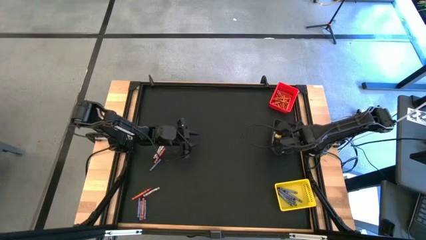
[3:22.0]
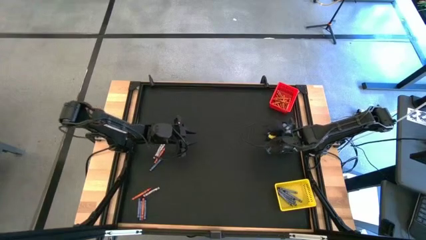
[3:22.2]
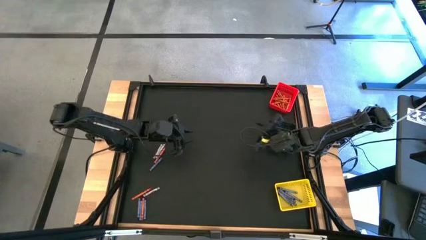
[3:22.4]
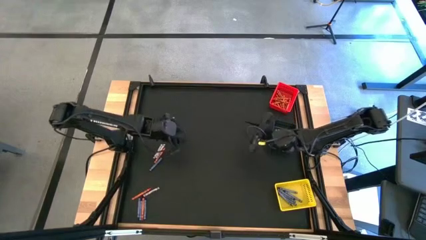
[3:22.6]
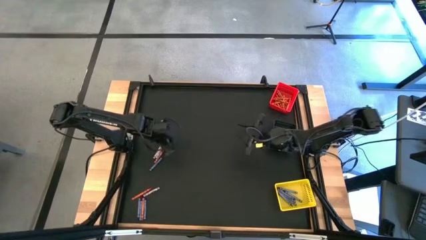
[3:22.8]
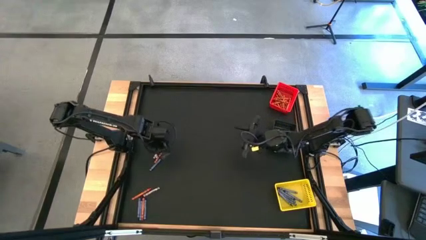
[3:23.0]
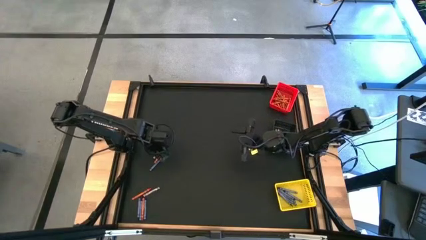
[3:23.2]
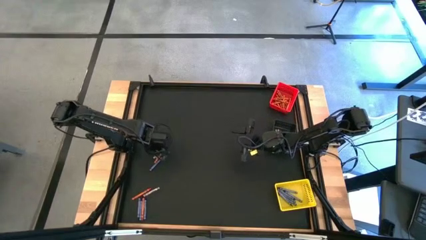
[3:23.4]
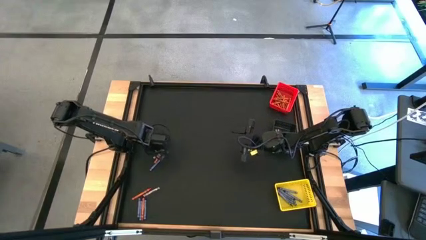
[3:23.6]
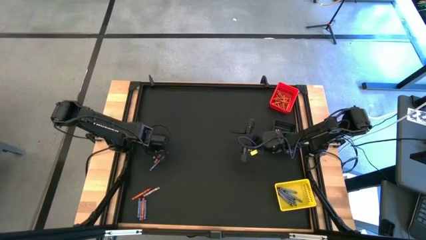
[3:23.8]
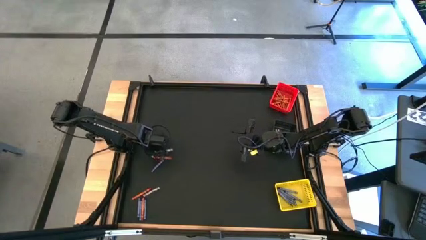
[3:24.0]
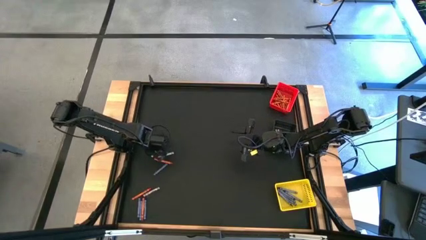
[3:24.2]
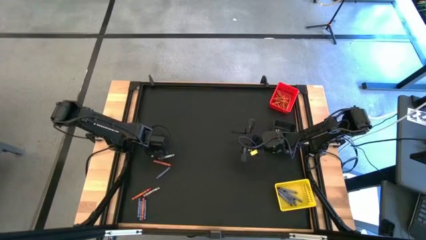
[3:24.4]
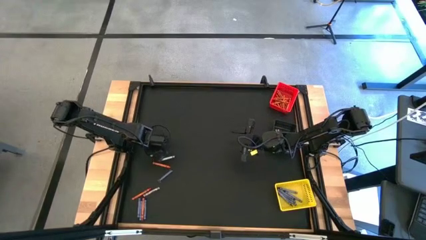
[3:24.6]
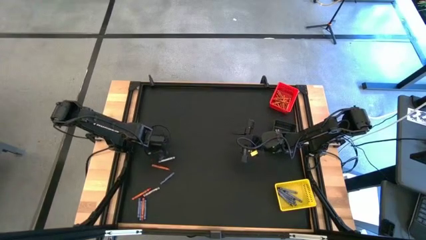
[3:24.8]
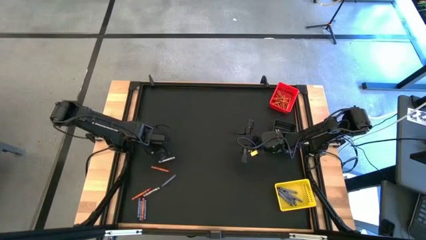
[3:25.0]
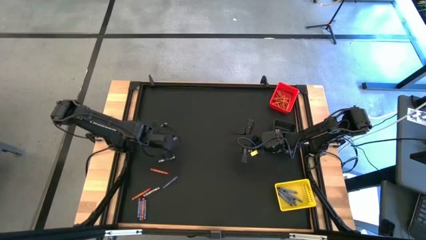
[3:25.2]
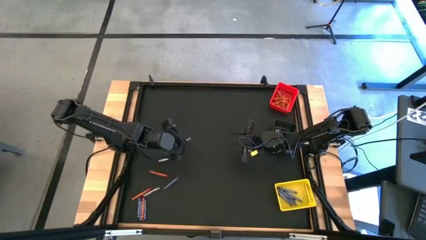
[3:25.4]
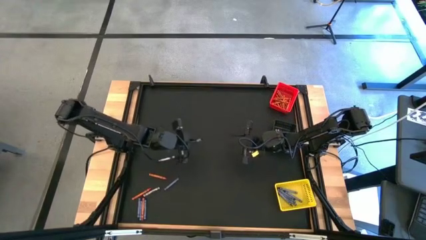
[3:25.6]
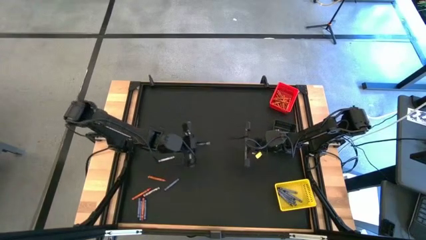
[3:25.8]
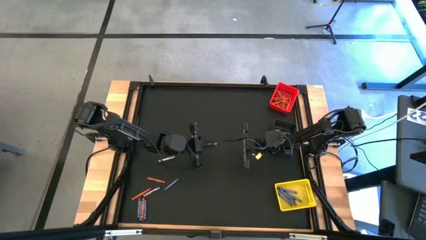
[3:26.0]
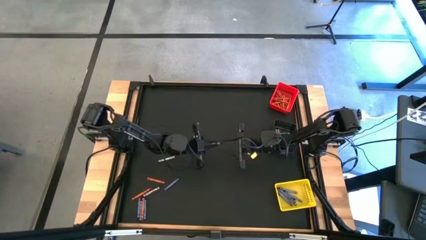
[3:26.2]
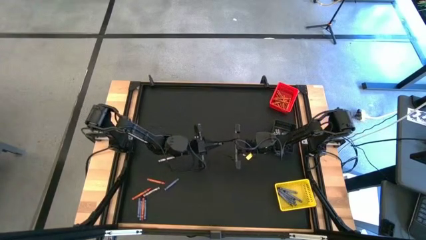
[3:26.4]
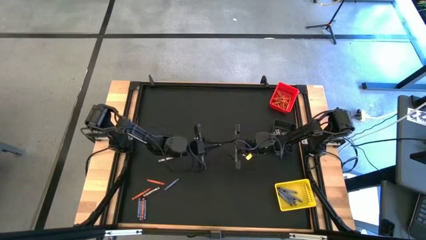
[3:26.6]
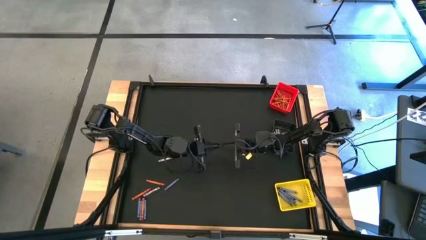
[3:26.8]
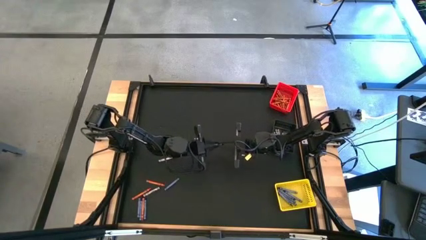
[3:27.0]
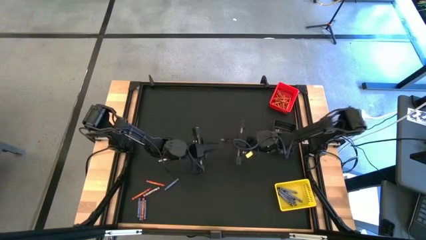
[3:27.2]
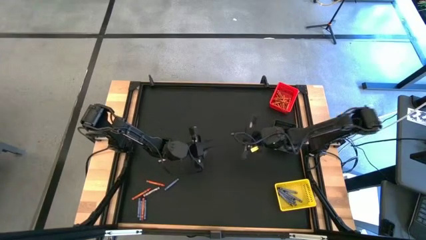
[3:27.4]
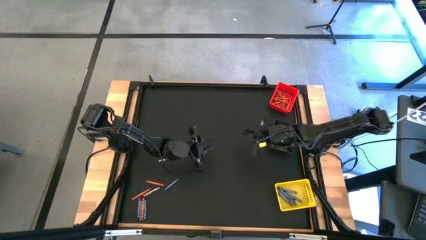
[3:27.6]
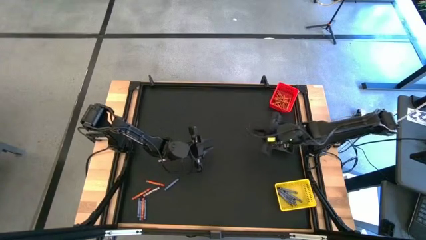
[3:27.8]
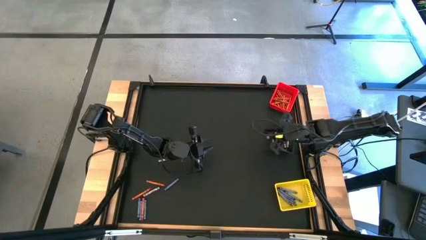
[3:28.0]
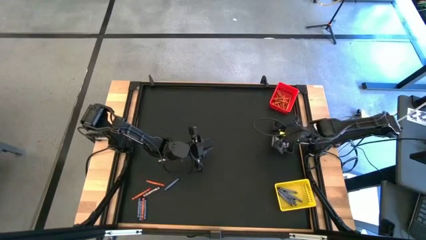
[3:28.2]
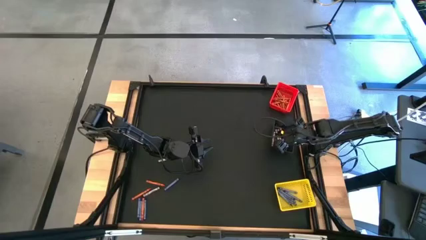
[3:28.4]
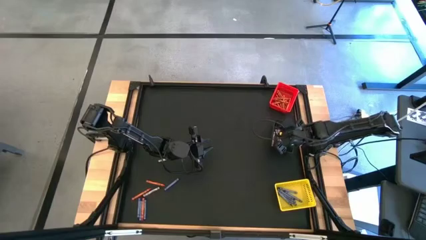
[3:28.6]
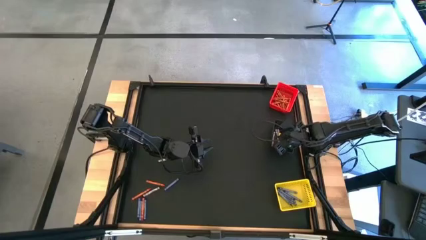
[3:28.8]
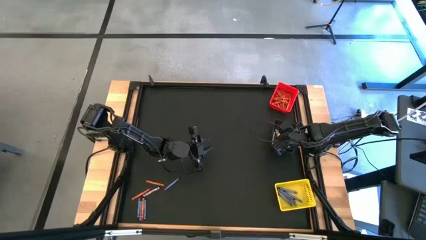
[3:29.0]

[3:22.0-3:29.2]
Task: Sort crayons
Put the black crayon into the black bin

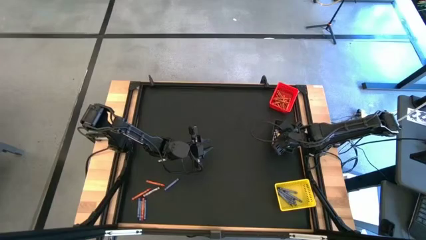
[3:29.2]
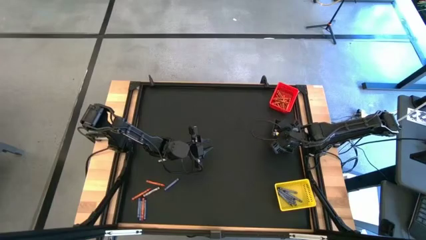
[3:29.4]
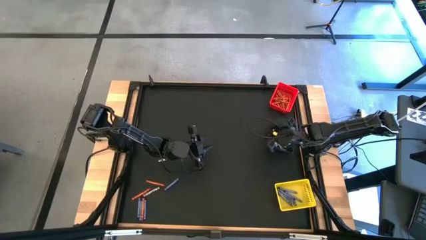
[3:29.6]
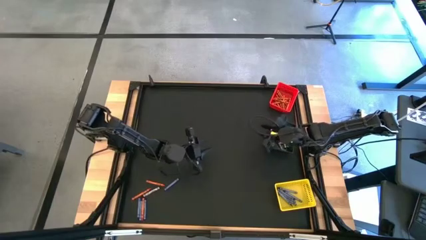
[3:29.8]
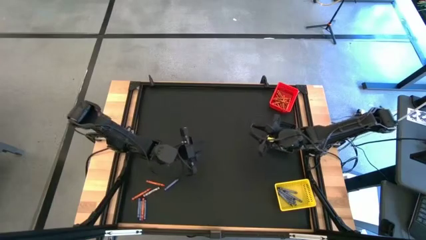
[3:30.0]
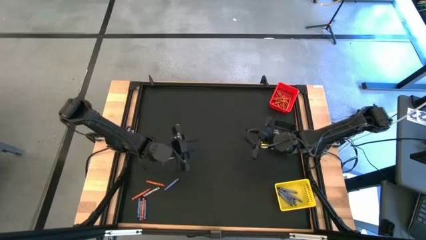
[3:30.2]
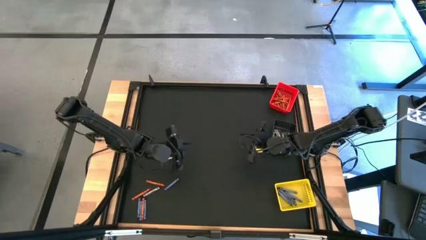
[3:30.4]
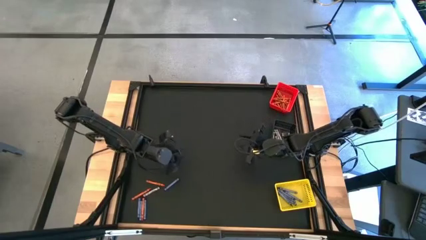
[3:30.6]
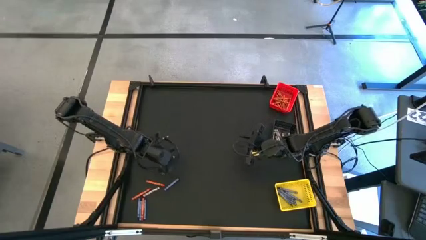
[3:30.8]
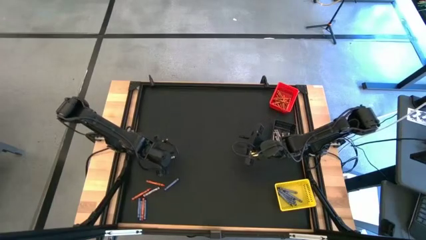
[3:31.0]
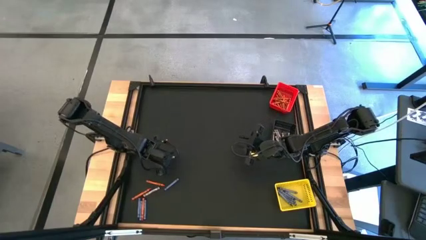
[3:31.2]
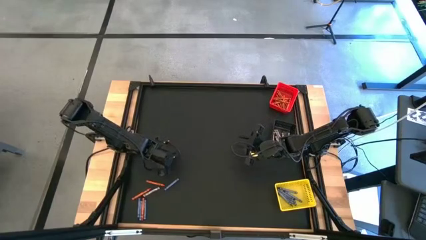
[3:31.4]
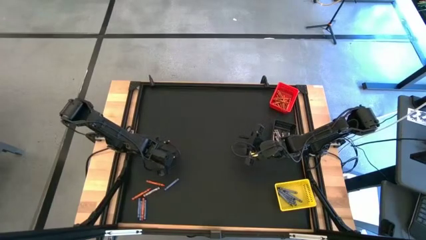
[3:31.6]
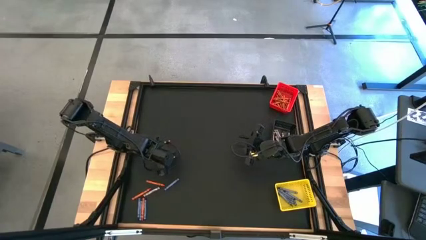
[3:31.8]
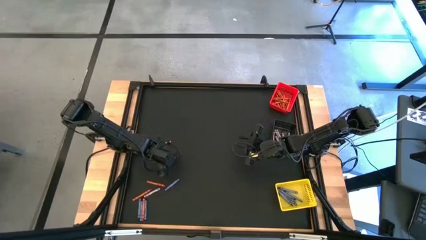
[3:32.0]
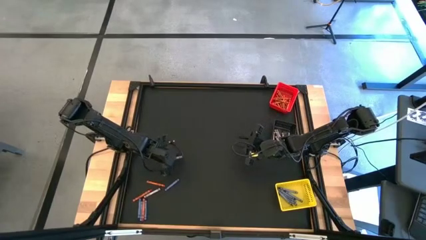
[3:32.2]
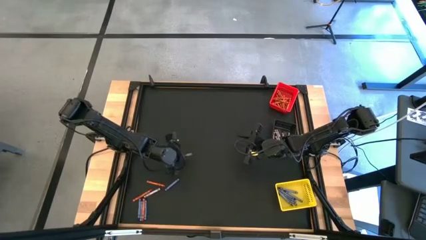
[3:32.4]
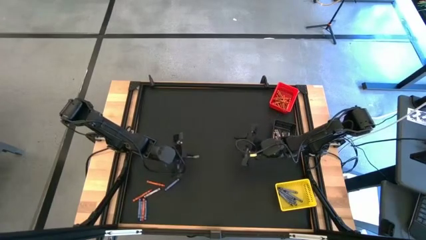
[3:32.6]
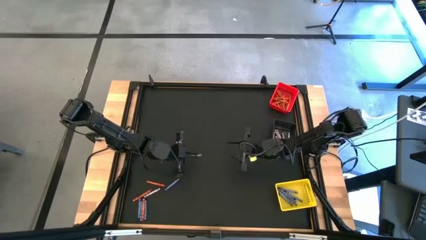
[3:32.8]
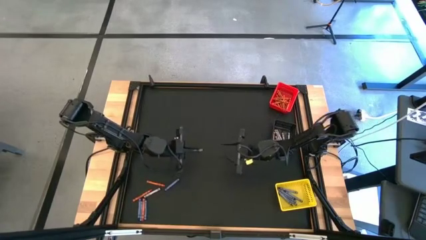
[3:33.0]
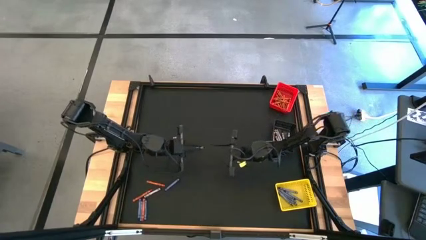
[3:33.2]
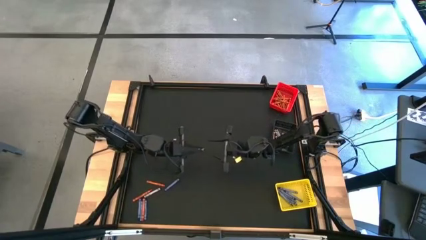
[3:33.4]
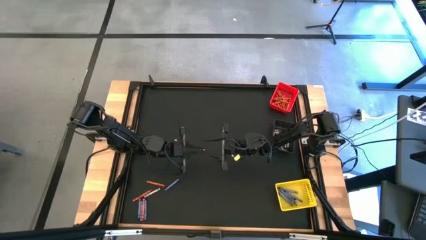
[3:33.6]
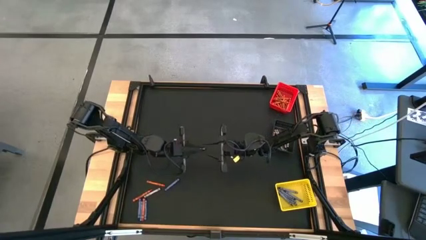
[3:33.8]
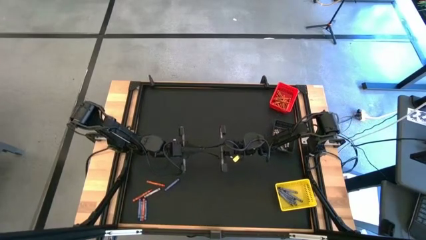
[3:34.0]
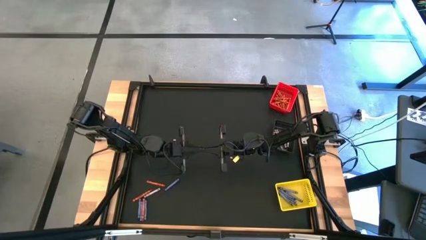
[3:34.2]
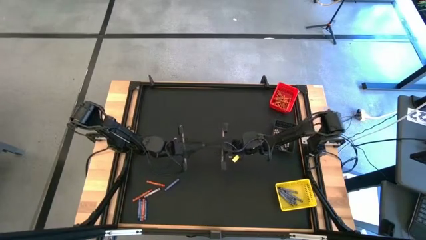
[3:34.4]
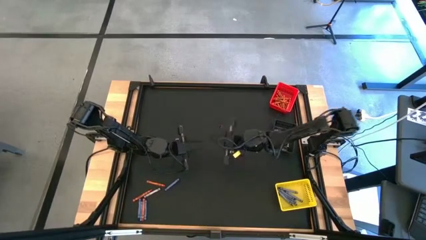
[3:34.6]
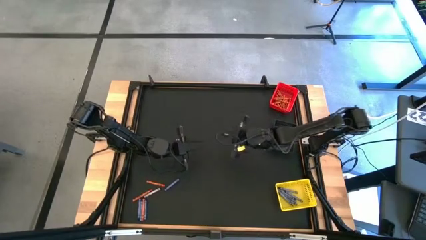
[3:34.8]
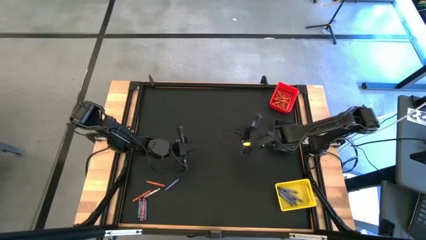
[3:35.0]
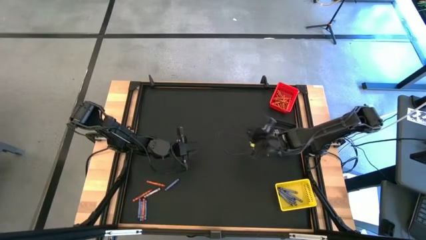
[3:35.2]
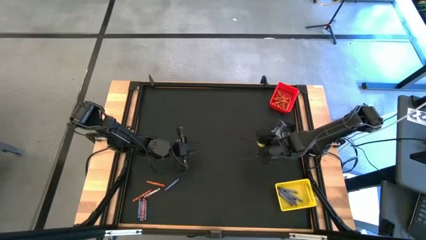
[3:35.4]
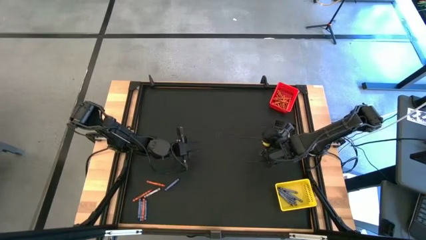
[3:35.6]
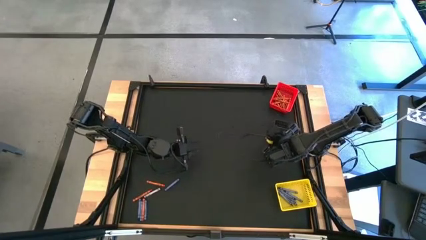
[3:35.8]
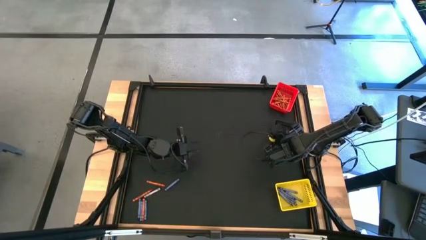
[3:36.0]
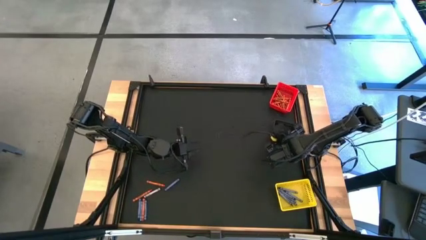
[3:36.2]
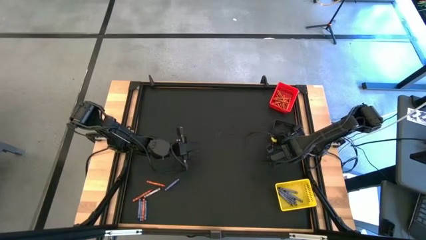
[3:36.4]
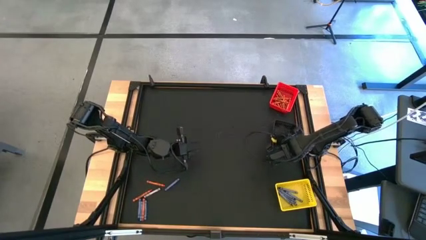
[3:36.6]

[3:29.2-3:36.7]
Put the black crayon into the black bin

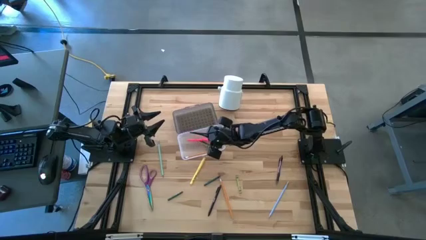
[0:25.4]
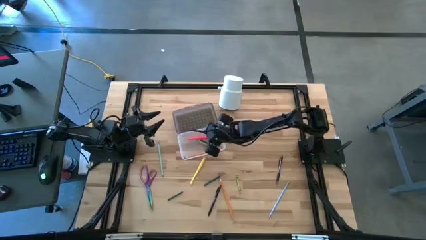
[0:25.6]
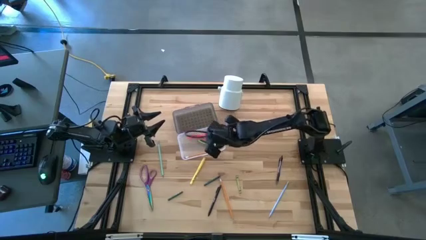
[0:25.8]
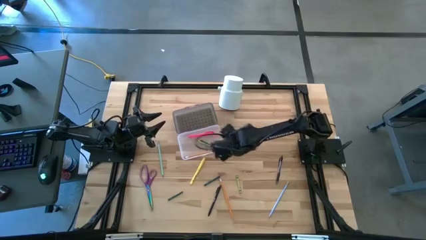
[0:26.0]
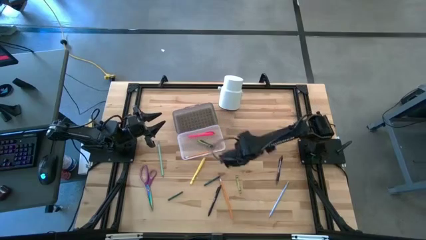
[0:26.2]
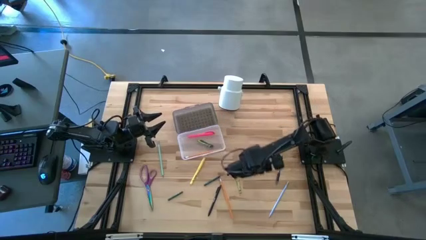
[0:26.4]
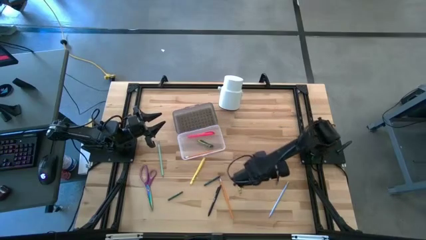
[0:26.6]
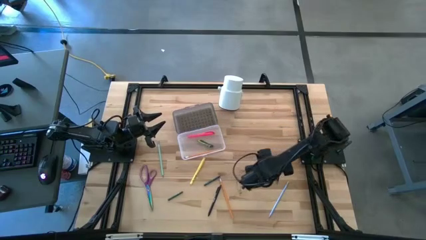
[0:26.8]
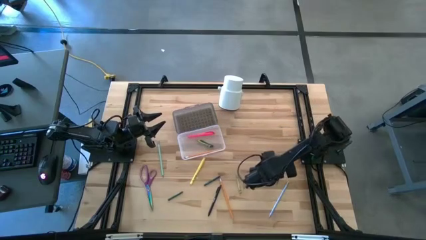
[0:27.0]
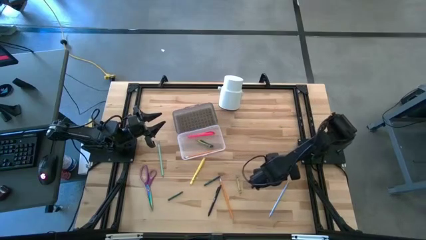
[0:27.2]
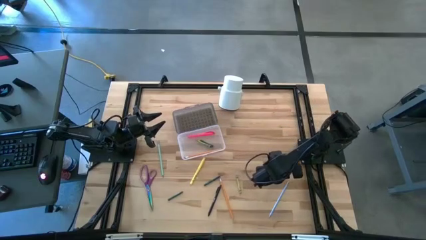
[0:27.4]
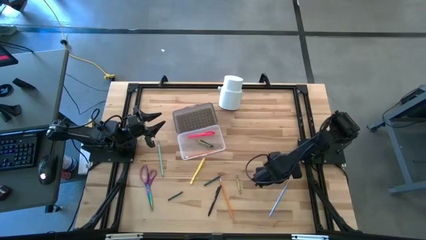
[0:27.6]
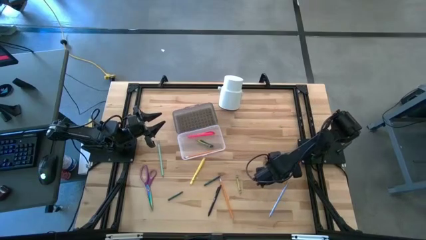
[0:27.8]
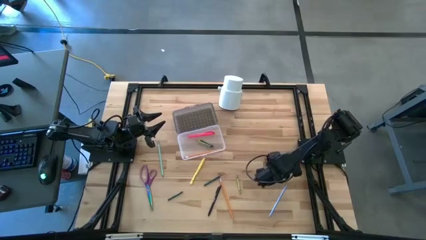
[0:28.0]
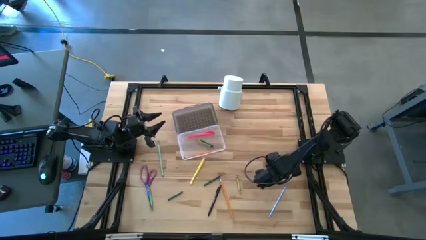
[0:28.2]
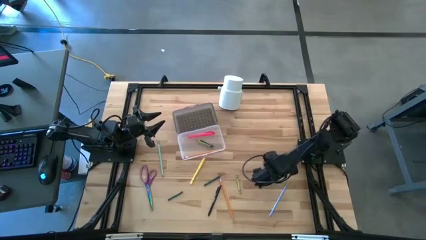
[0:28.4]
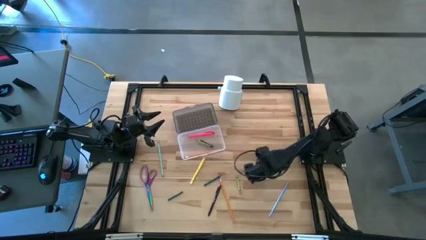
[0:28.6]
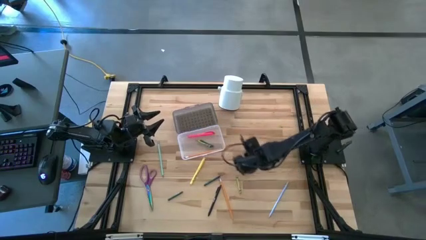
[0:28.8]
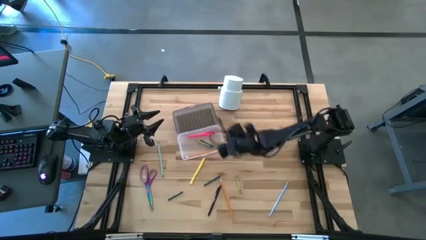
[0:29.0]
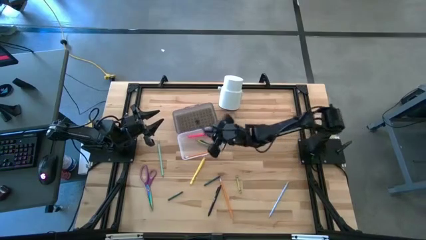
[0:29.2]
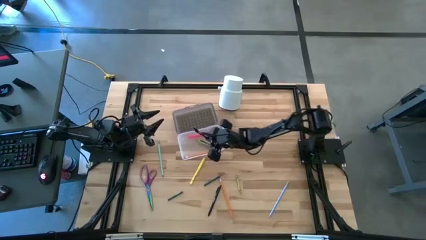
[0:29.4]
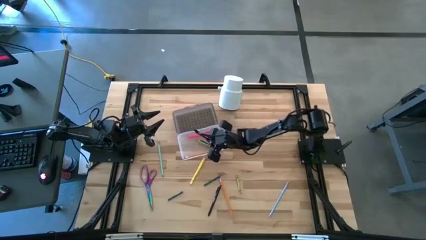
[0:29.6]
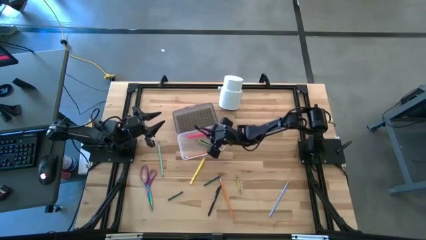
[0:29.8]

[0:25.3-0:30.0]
Task: Pick & place school supplies into a supply box
Put the top black pen into the black supply box
